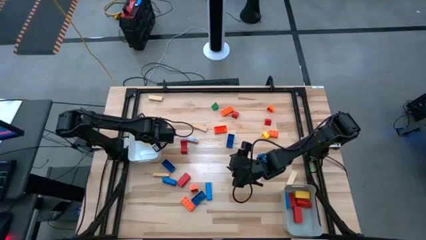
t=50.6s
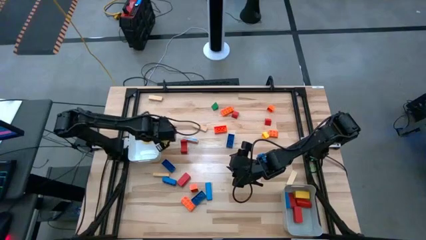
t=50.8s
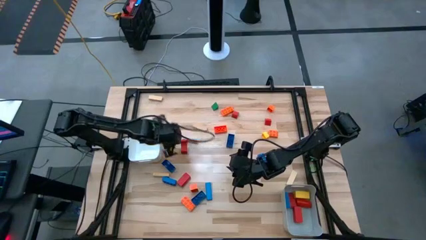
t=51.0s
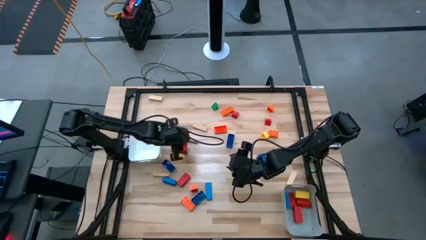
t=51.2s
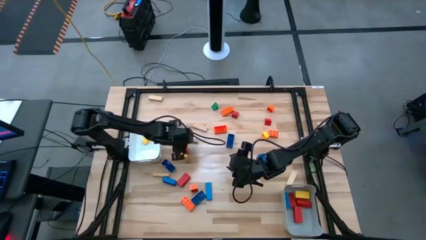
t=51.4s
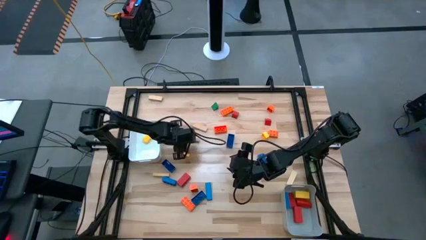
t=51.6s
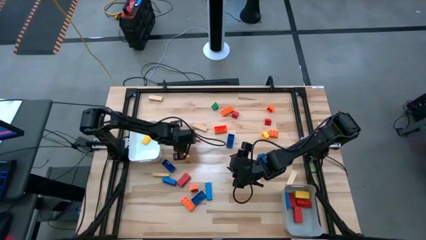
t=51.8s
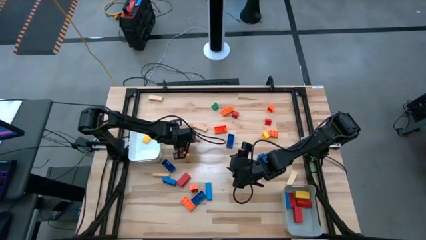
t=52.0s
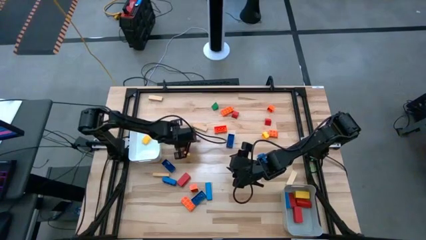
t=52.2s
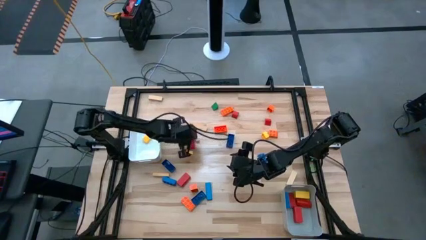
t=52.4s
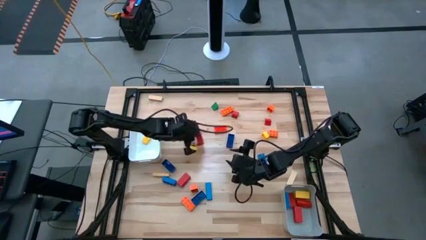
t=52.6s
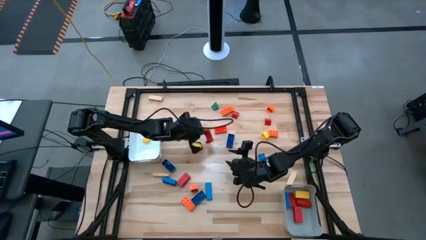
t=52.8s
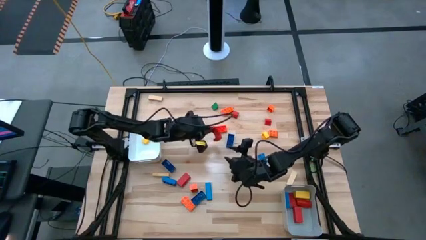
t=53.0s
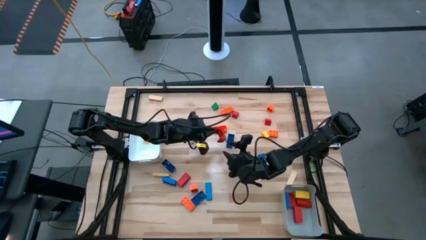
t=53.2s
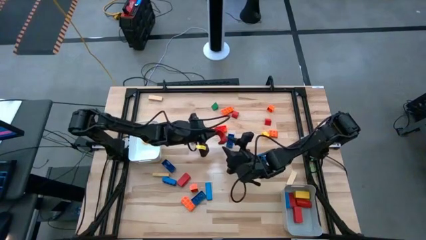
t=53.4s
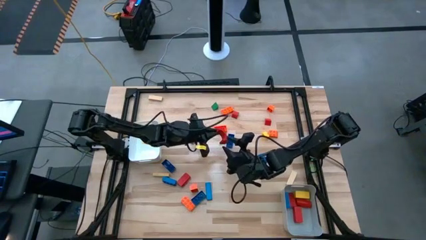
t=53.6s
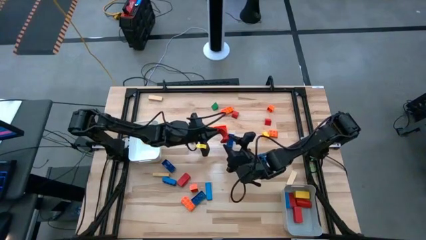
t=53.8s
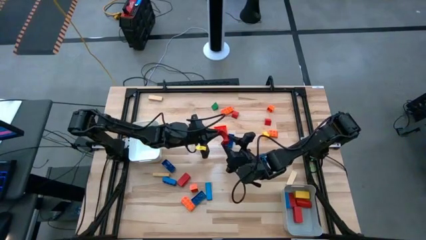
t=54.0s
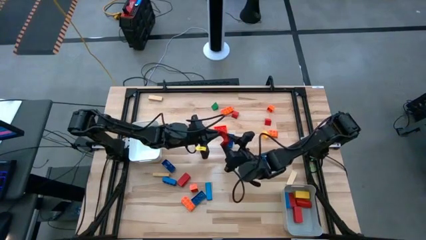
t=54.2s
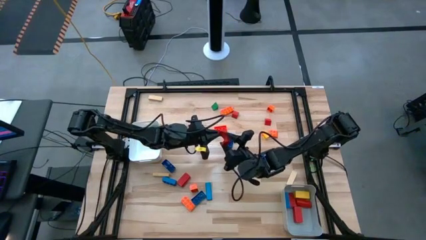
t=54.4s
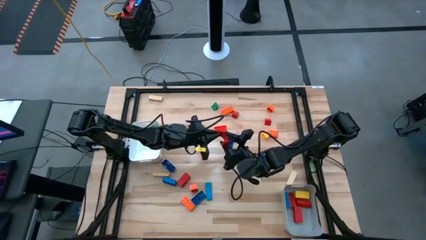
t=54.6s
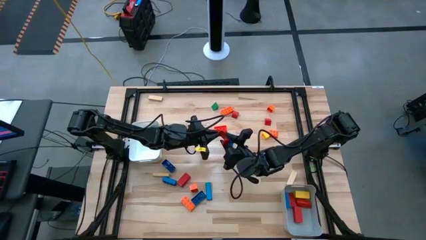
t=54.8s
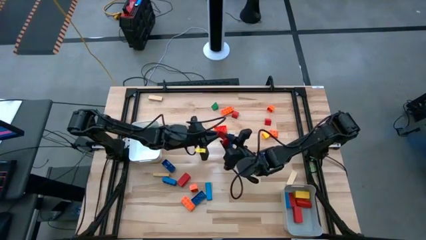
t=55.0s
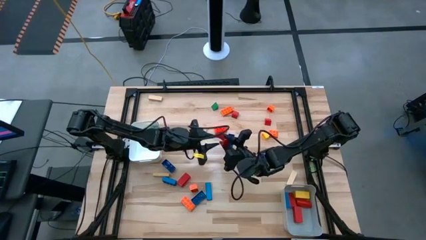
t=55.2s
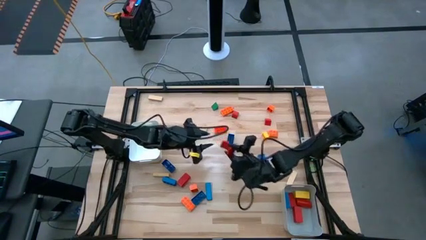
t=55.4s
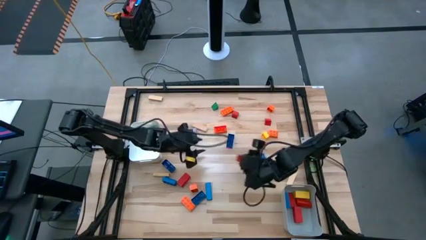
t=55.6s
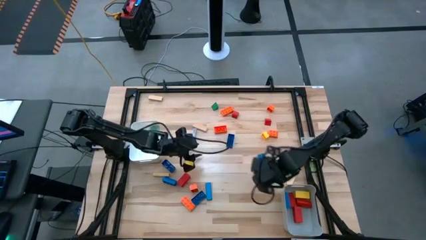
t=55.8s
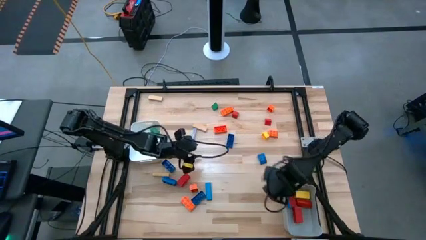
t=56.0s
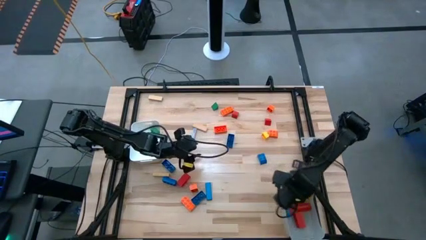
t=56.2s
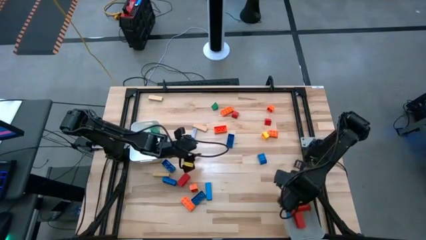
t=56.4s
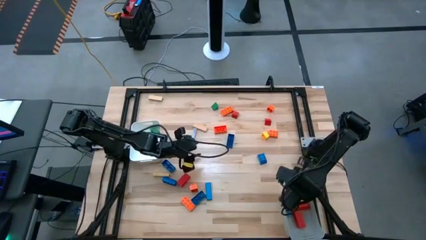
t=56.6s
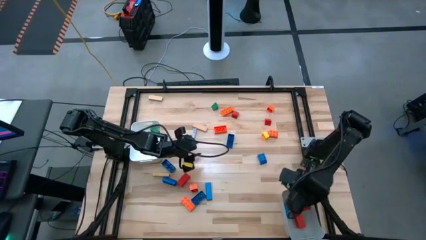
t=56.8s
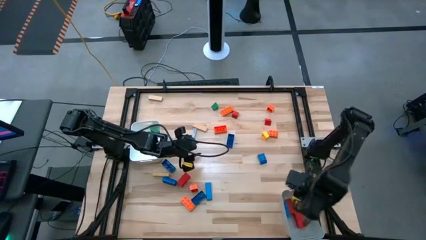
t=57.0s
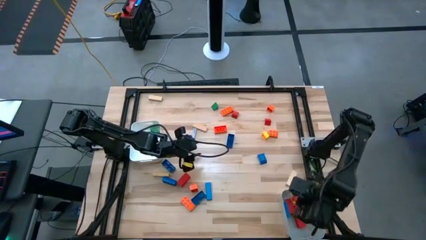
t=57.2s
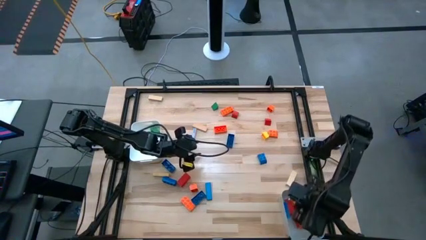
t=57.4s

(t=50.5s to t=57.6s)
Task: Sort blocks by size
Put the red large block into the gray bin

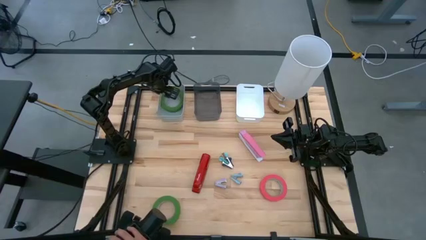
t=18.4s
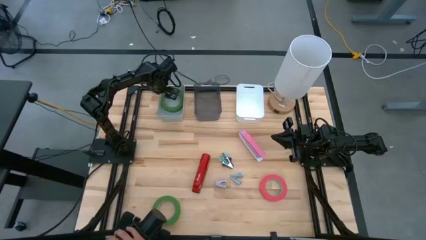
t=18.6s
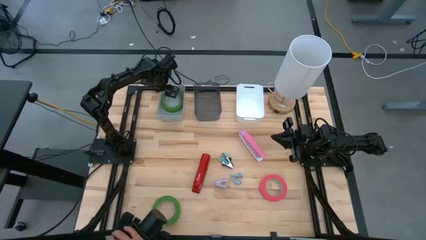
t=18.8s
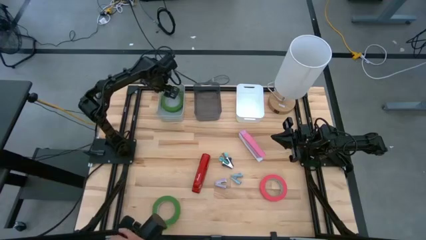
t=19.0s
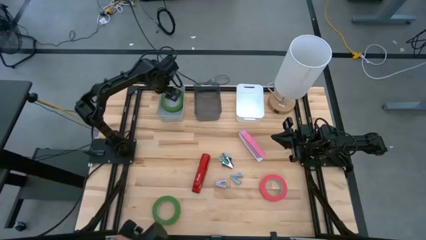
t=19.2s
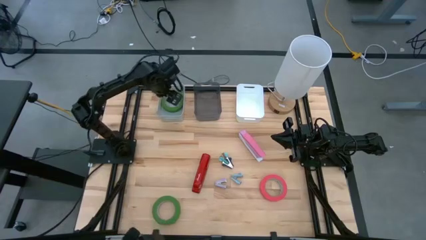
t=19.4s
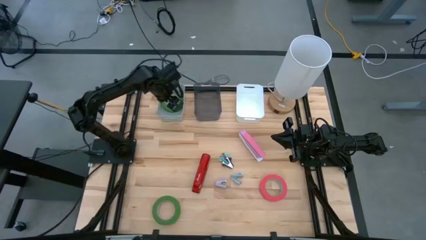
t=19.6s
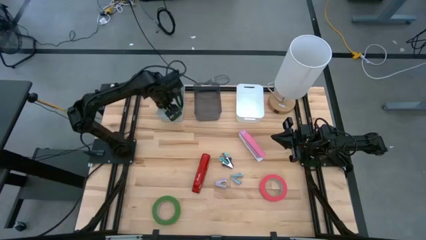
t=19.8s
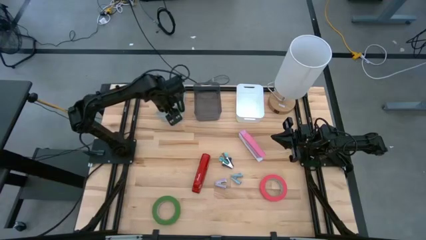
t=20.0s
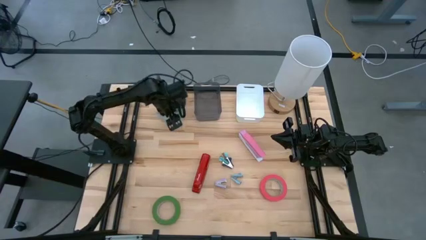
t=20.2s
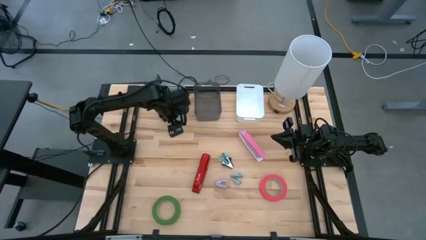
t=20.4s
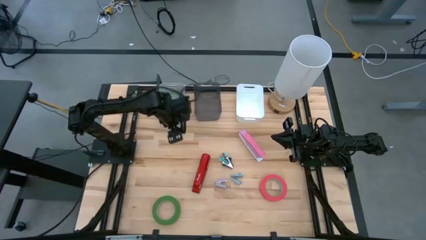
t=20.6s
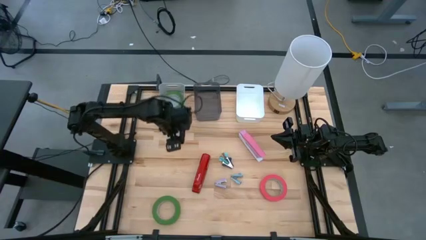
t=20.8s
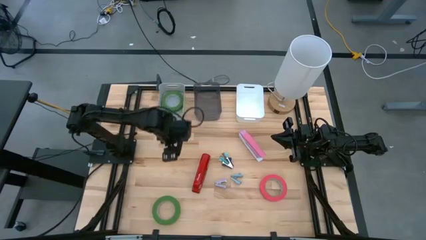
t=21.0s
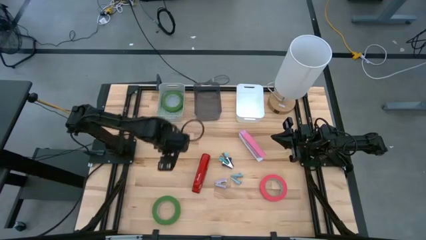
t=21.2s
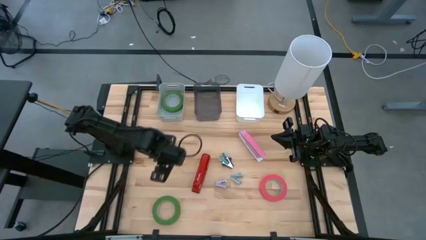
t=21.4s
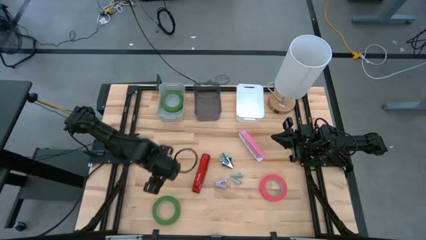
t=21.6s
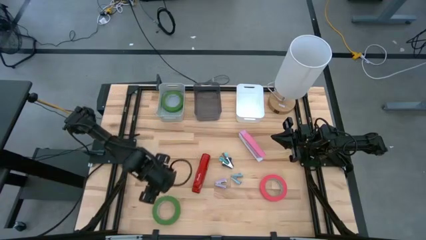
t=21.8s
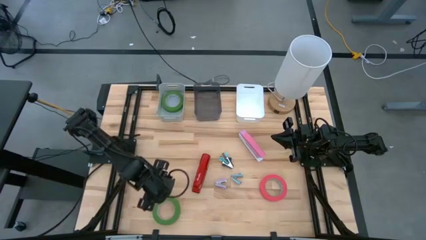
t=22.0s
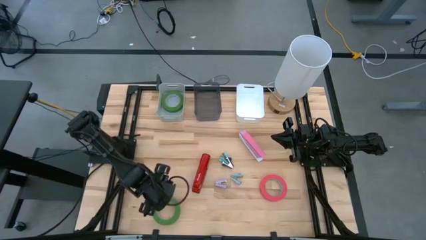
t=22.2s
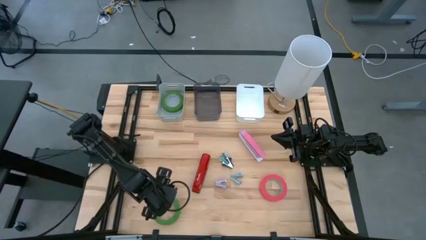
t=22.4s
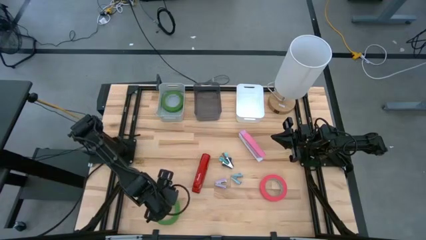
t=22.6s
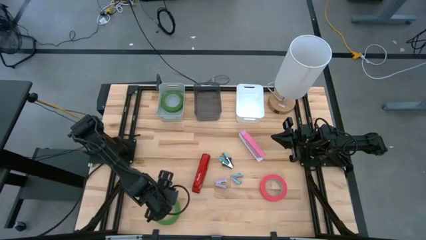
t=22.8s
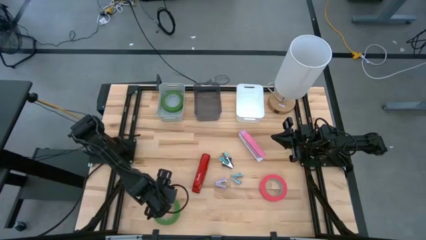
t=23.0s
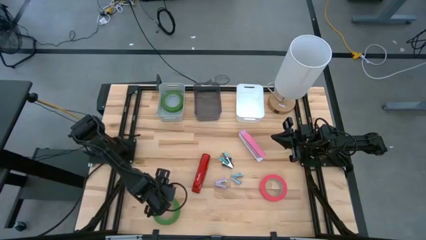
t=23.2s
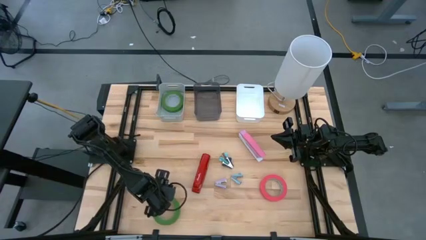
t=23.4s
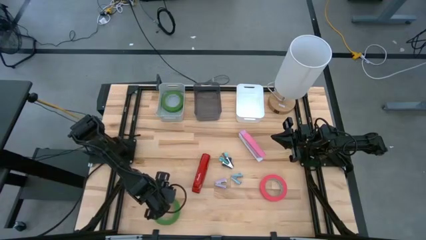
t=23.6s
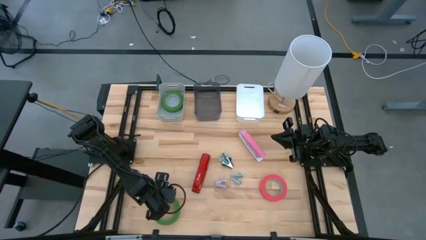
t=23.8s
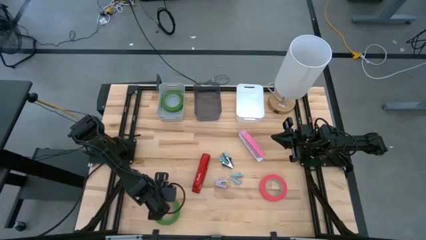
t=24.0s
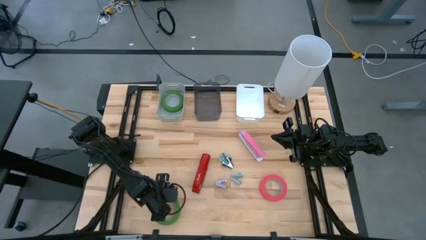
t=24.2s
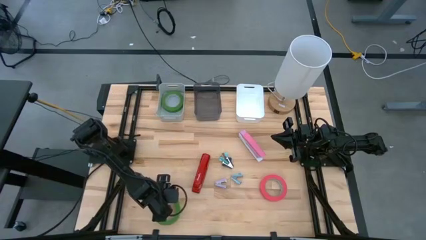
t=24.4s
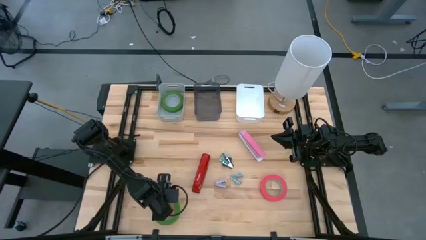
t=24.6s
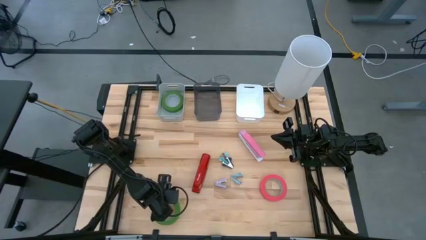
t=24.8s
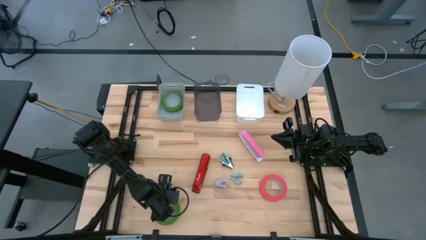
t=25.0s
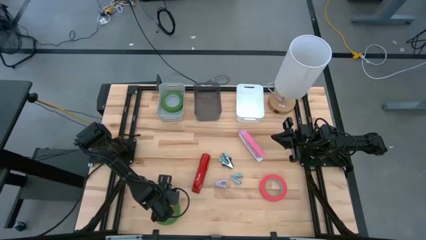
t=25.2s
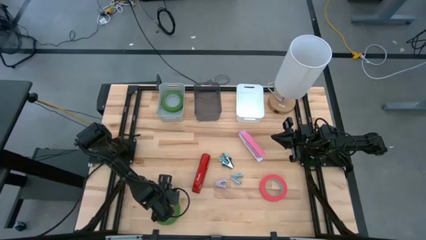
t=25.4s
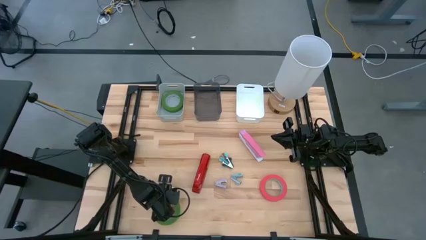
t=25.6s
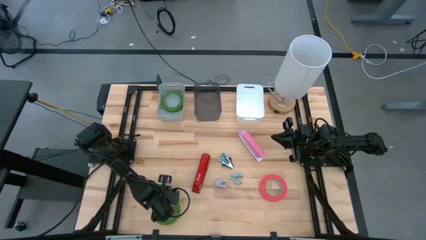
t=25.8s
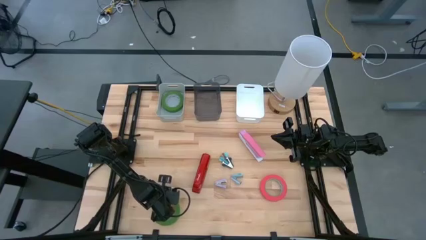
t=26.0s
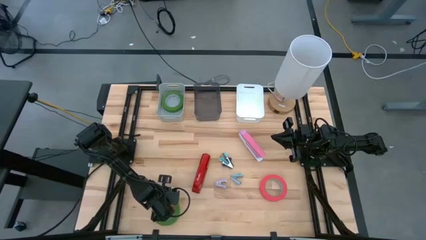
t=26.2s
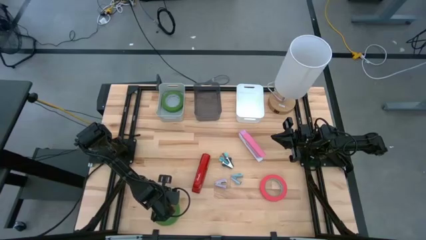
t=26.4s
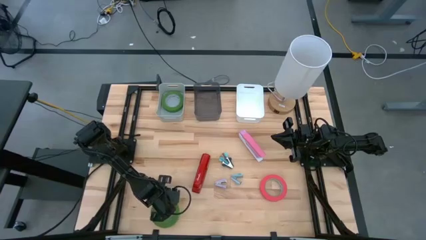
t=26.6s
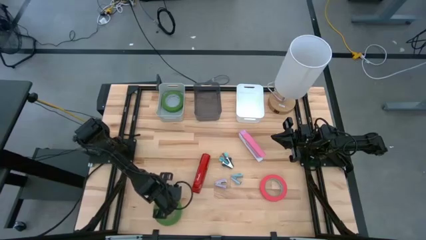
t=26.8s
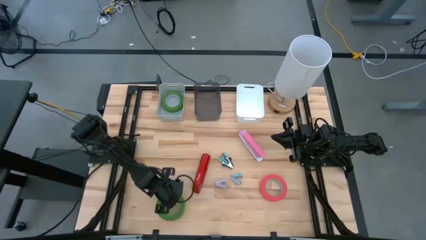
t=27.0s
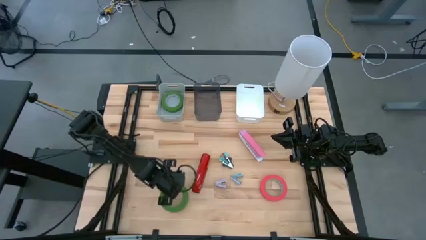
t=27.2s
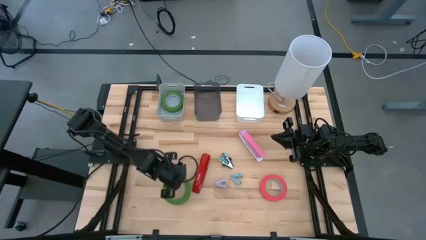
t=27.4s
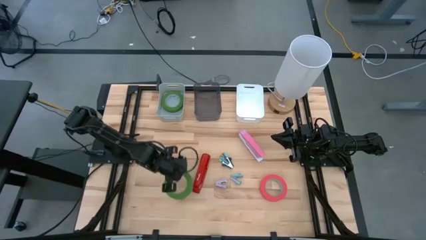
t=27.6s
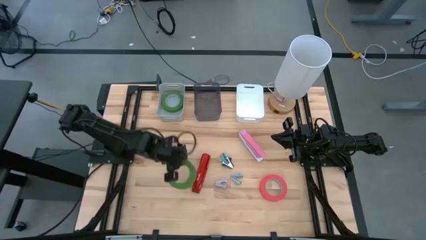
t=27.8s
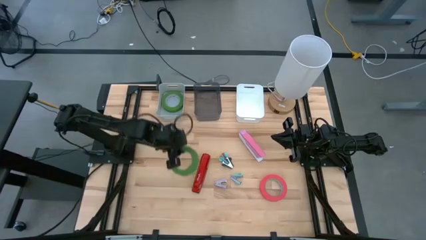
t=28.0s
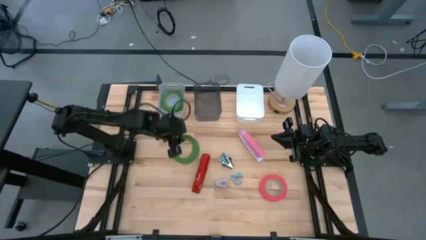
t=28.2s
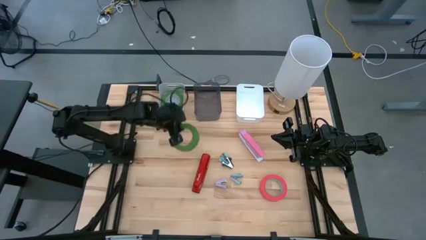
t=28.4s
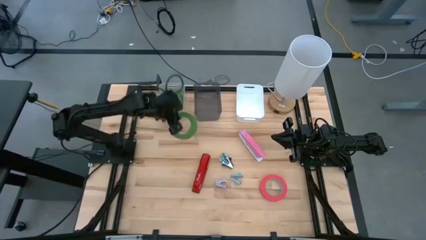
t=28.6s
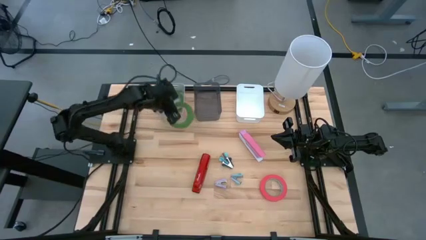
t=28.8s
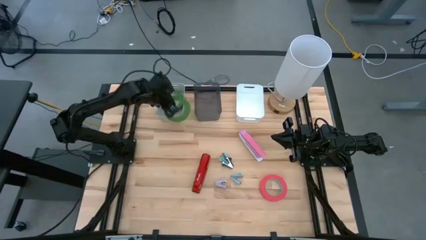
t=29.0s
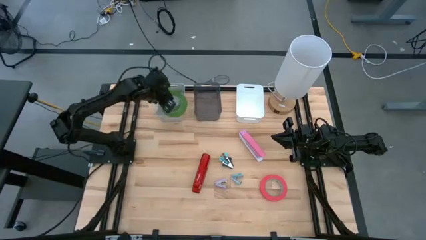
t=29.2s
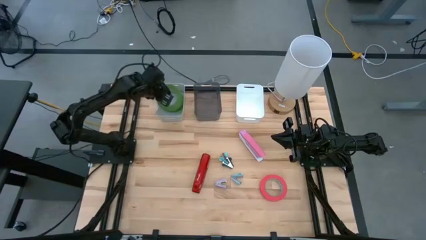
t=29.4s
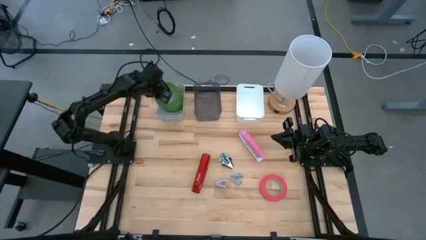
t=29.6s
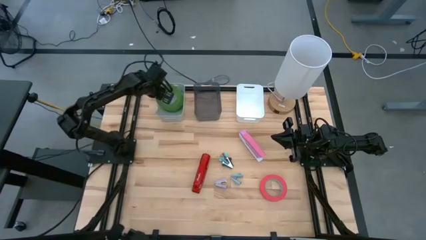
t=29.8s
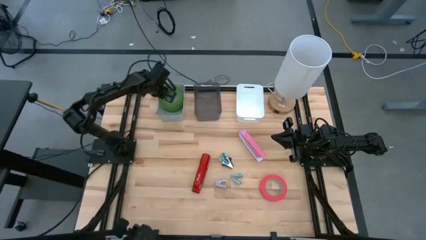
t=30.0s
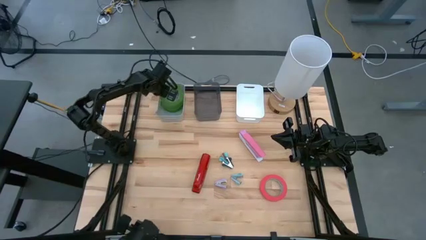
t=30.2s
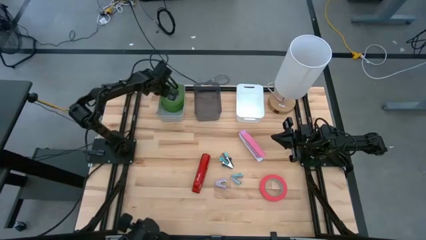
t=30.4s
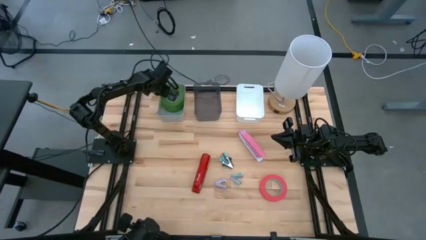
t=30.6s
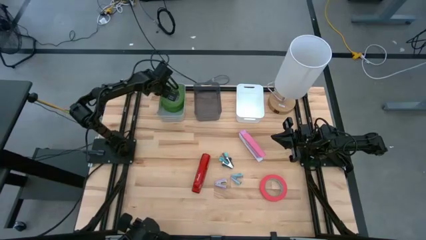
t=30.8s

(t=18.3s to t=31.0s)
Task: Pick and place Stapler, Stapler remover, tape
Put the green tape into the gray bin
